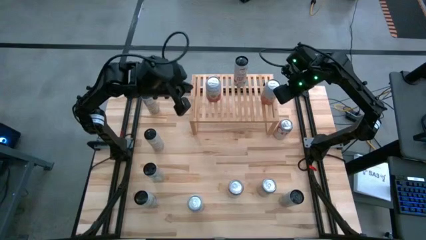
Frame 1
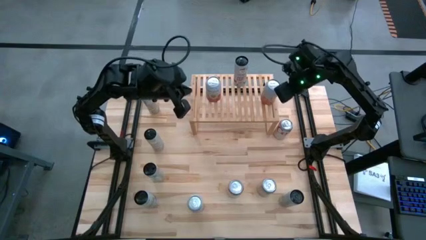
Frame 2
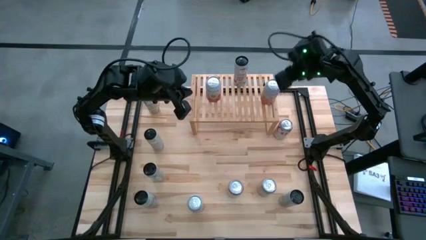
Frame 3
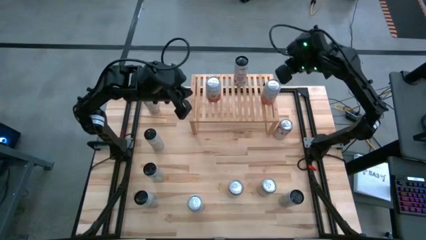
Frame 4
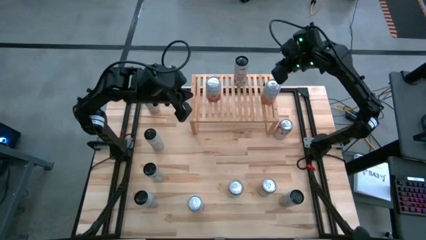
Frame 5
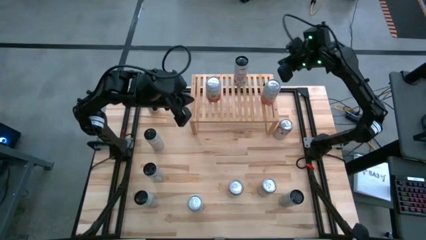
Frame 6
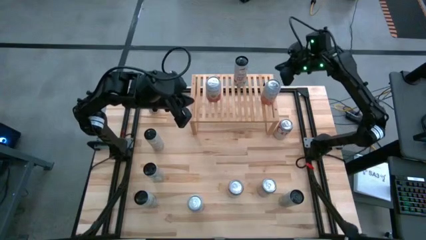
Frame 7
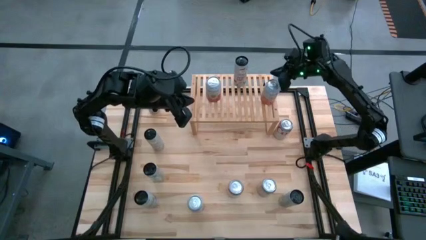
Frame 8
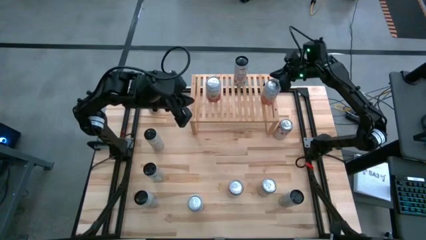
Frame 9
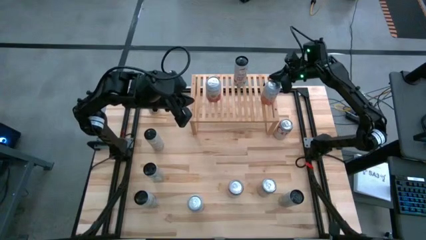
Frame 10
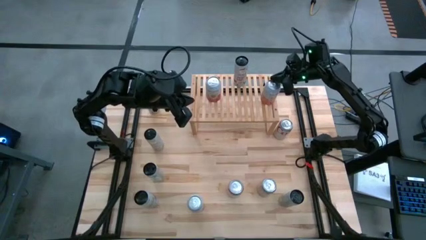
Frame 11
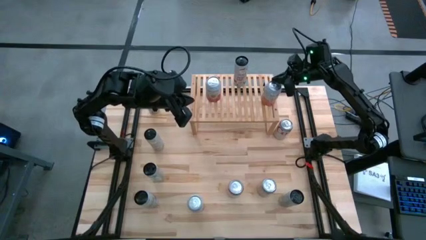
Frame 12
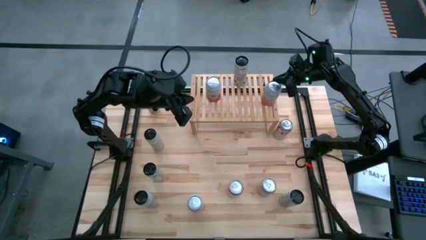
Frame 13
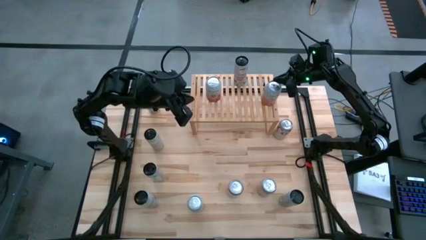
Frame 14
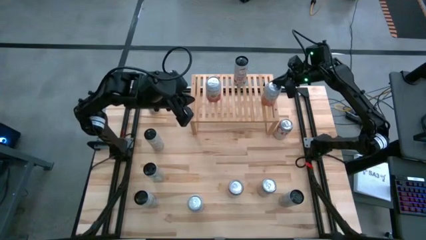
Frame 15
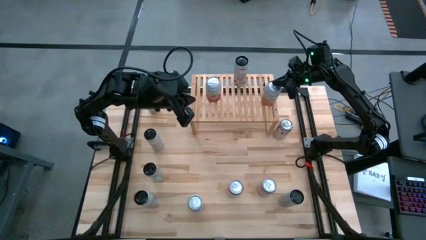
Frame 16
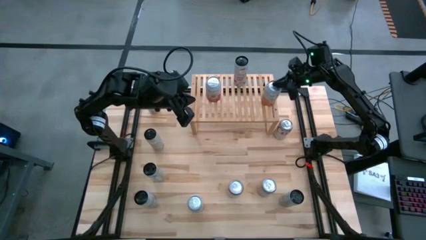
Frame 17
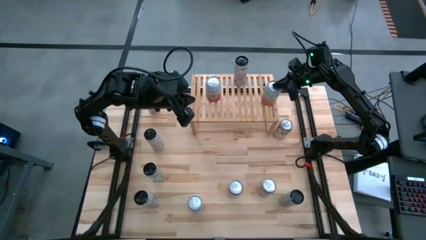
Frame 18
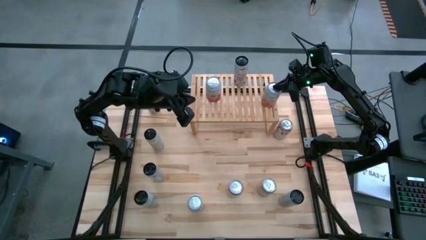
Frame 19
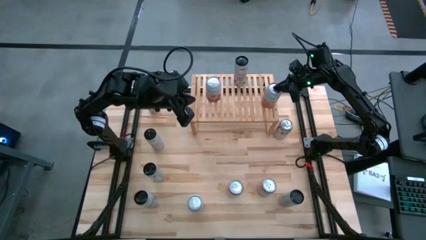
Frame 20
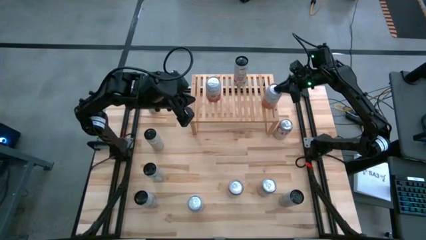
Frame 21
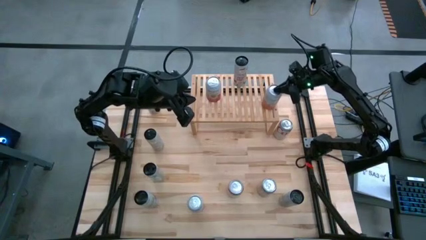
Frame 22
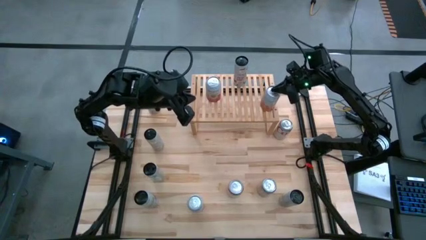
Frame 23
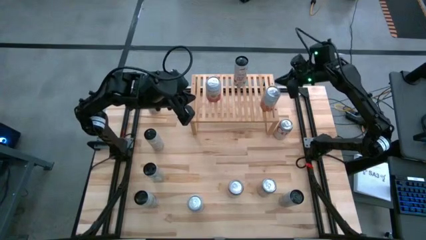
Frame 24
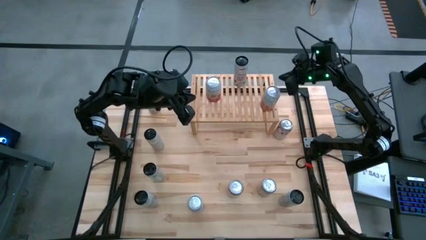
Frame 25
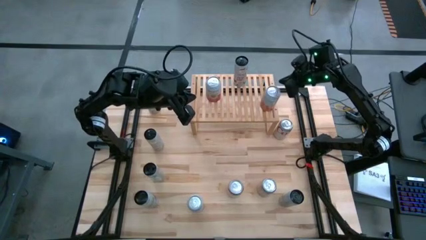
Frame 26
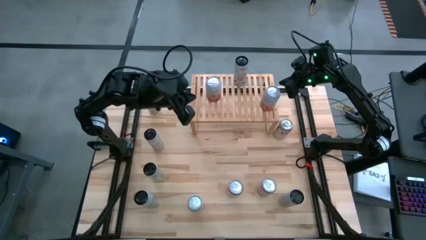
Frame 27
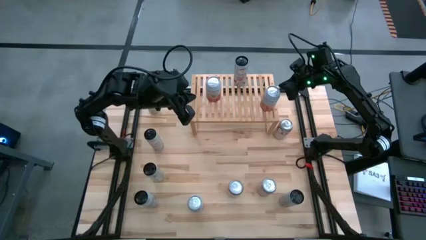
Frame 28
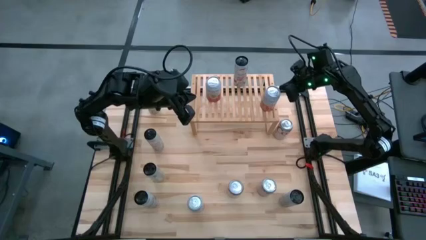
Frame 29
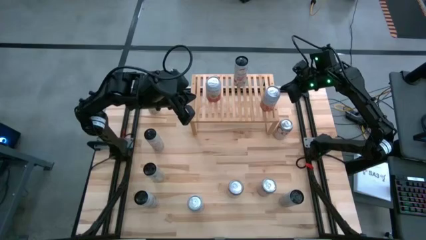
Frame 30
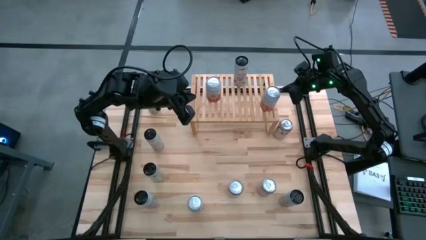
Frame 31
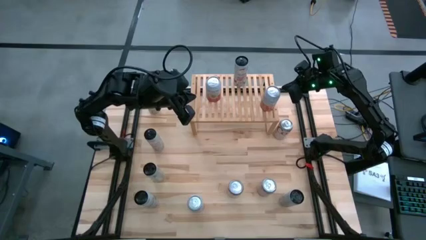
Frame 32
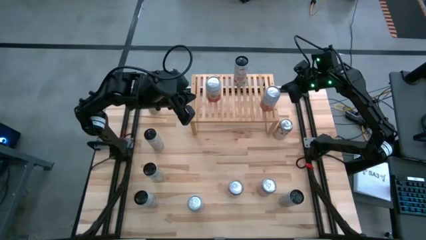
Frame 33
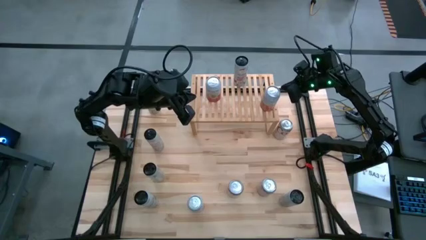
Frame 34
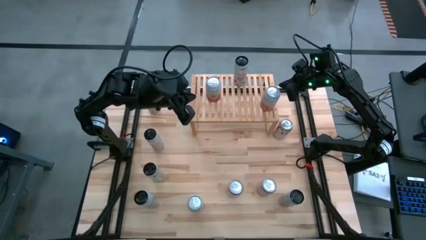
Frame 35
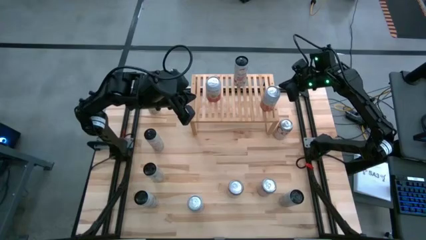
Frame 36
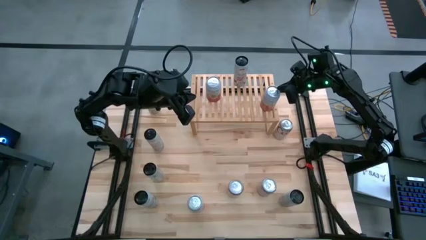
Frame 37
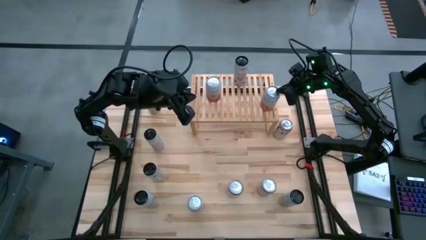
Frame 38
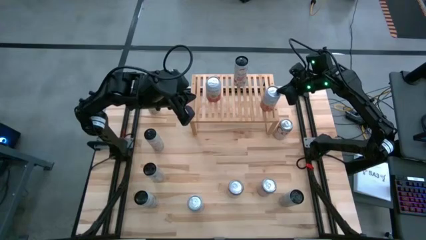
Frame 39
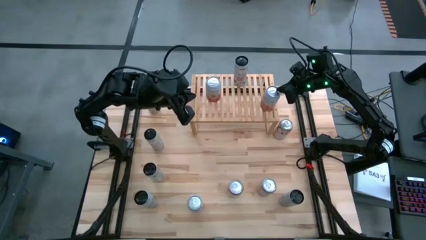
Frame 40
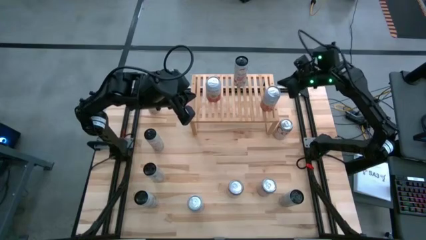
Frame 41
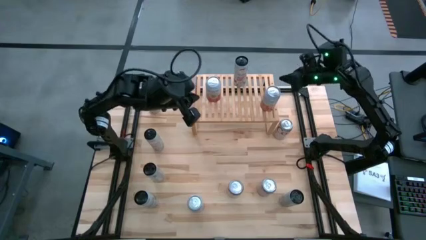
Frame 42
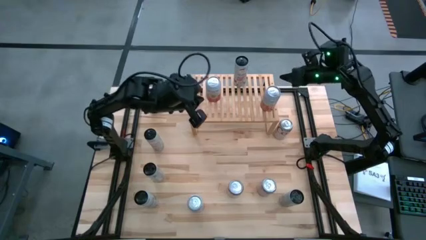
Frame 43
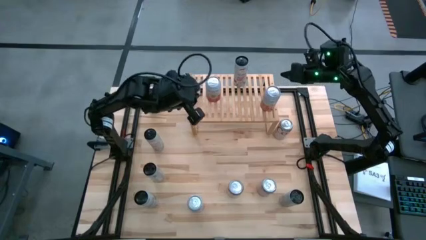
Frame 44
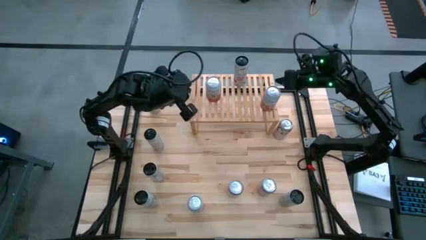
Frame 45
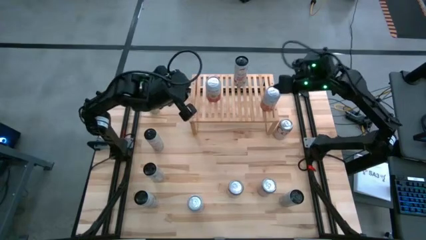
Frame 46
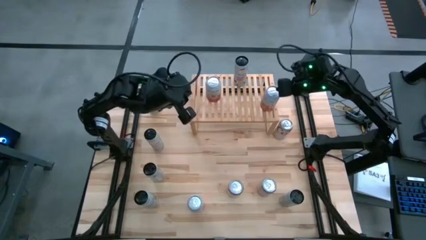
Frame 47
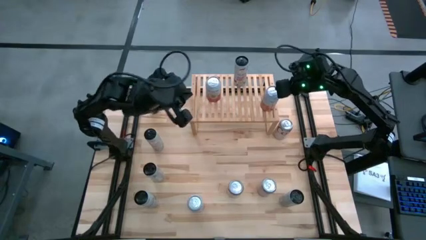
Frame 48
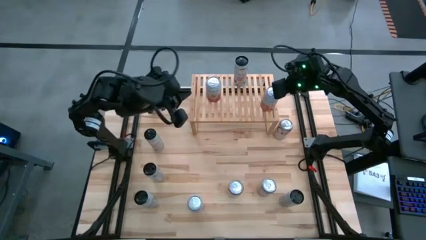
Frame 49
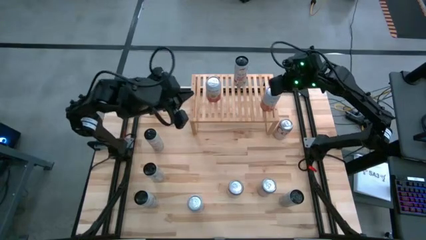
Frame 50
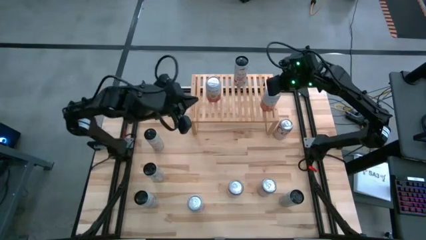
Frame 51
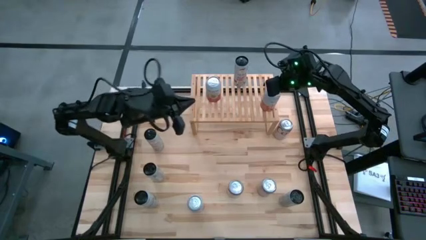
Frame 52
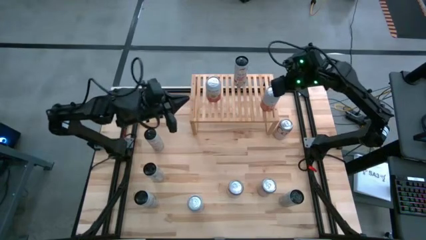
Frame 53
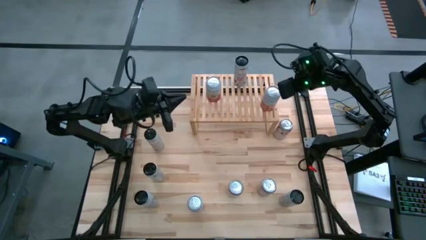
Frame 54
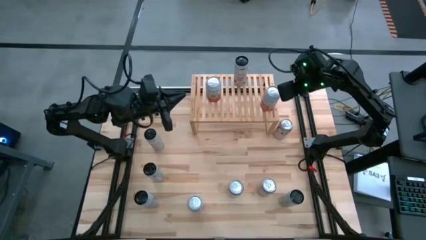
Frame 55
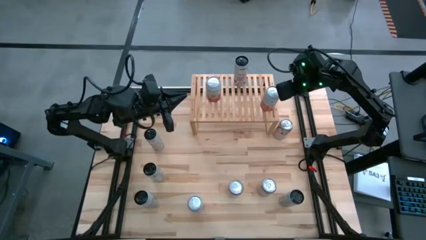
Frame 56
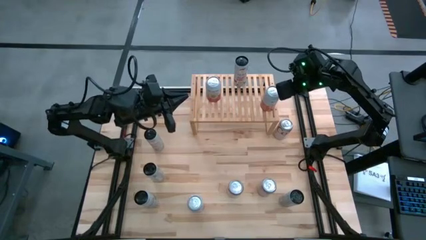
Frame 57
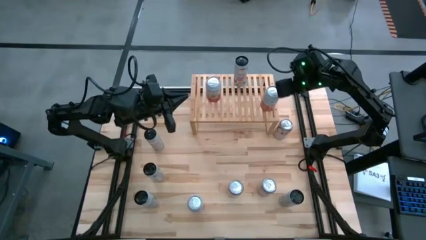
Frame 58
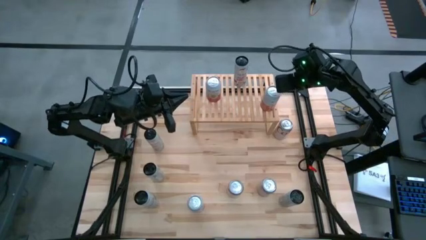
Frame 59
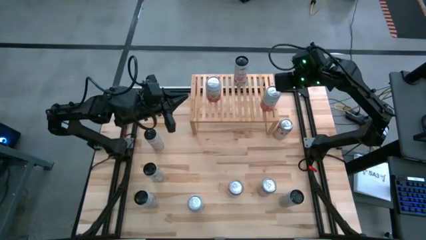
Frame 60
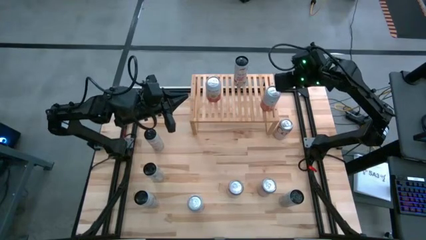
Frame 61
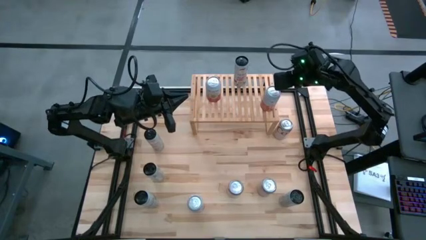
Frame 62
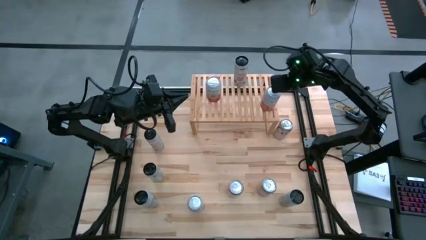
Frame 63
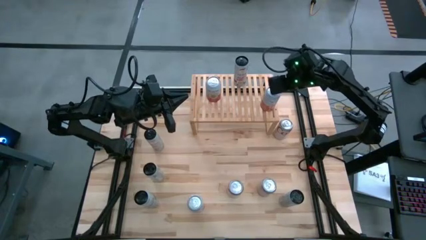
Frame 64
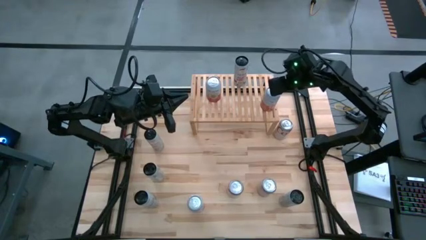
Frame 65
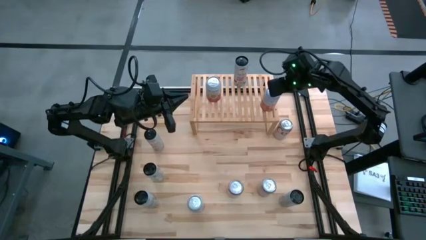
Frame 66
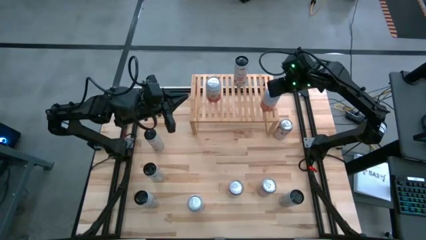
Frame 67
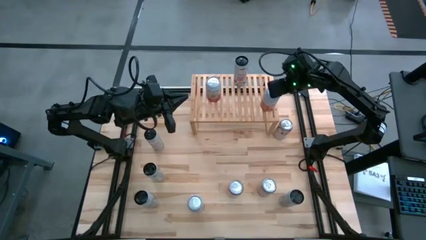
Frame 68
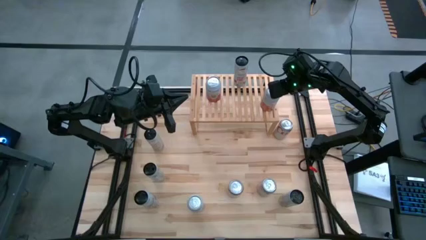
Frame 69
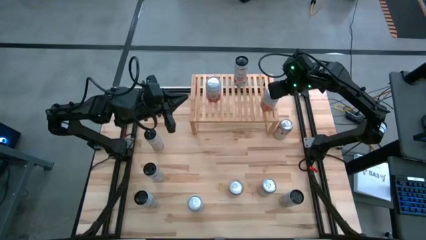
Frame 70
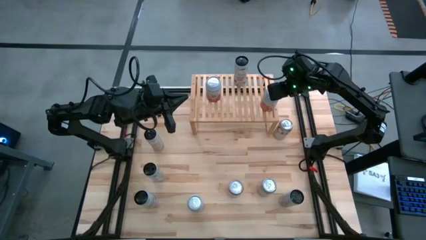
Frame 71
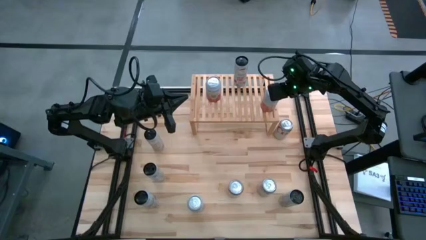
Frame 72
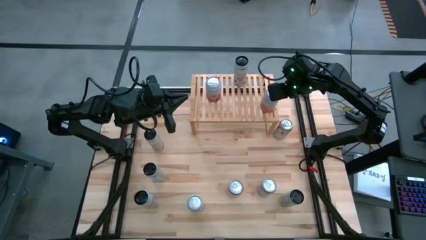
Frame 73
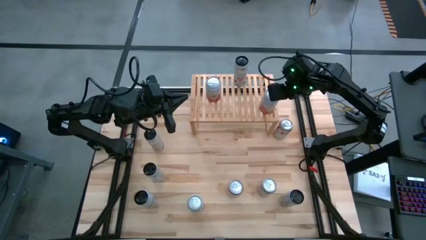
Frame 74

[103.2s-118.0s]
Task: Place canned beverage on shelf
Put the orange and white soda can on the shelf

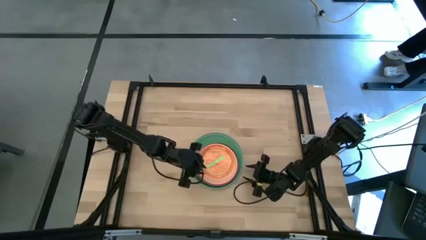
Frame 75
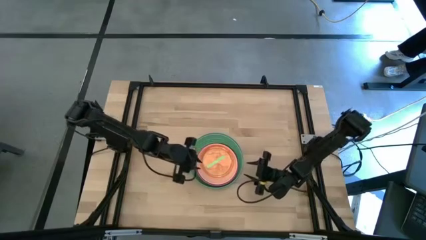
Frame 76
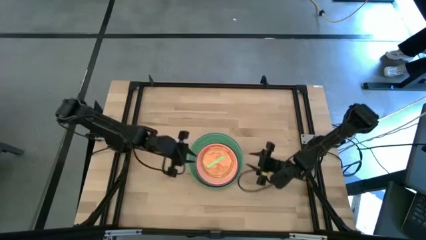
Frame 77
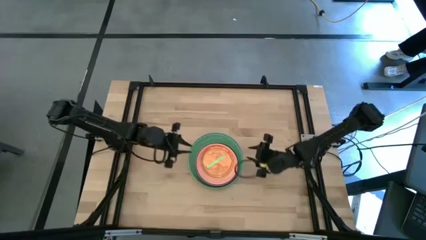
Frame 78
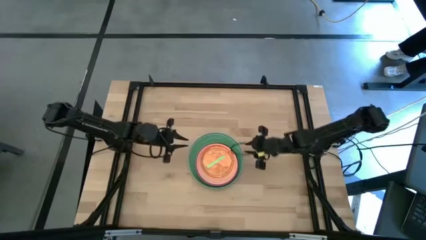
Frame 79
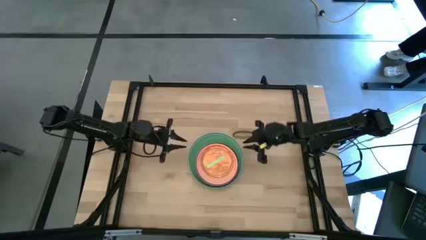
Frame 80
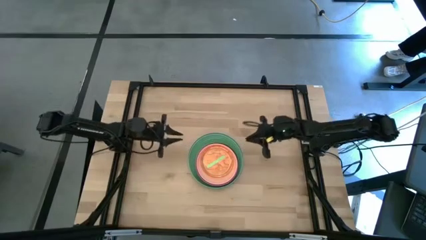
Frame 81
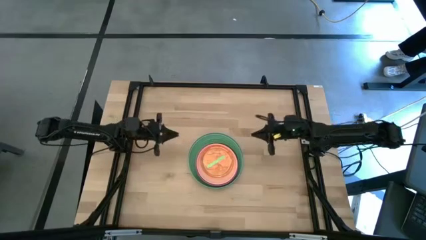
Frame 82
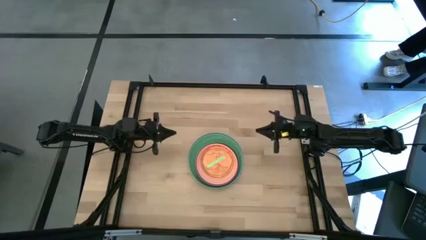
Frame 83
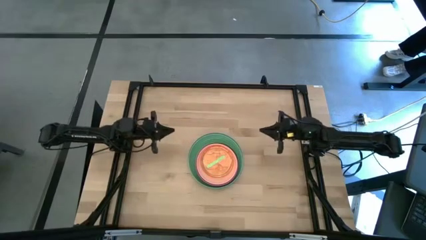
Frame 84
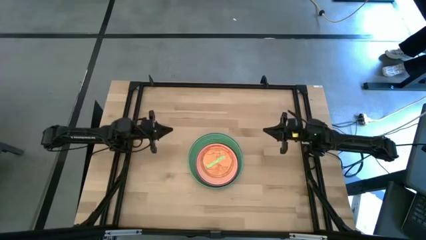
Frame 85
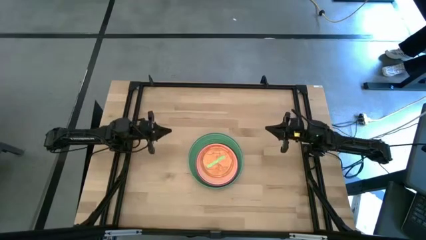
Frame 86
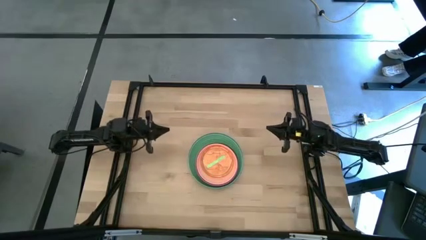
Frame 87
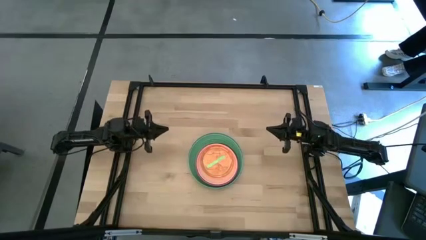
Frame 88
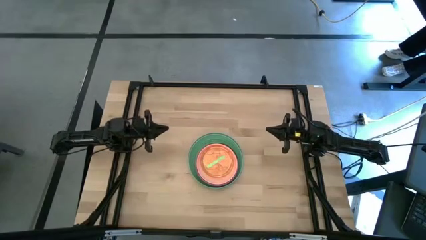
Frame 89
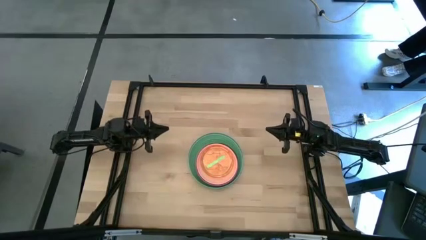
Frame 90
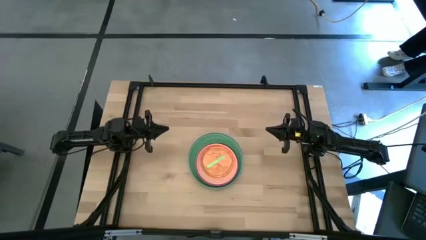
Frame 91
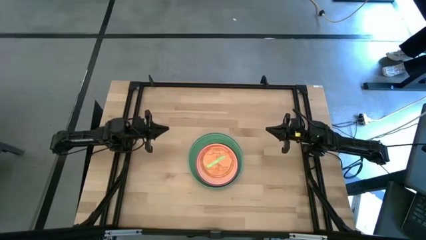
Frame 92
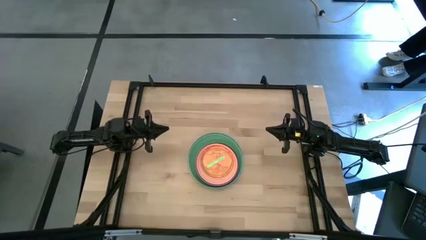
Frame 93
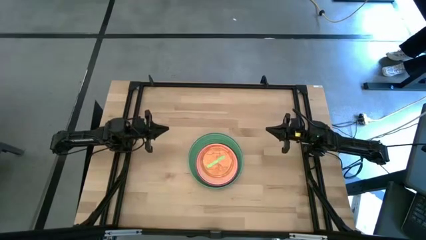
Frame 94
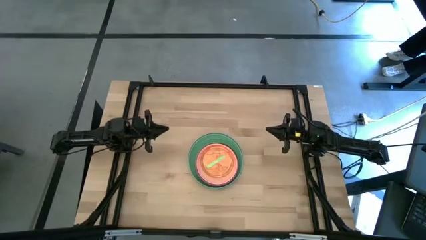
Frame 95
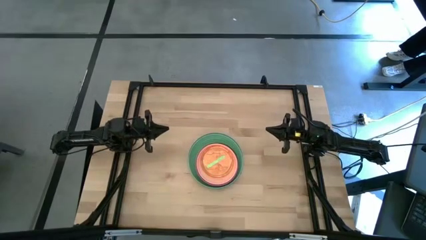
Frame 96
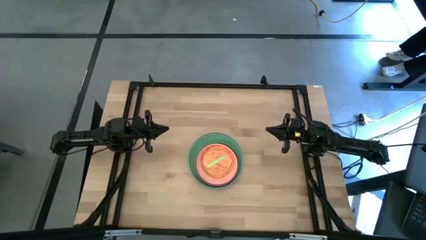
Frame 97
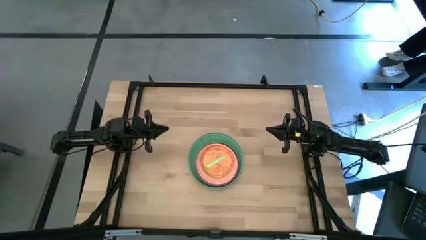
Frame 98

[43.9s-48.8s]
Task: Stack plastic plates
Return to Home Position
